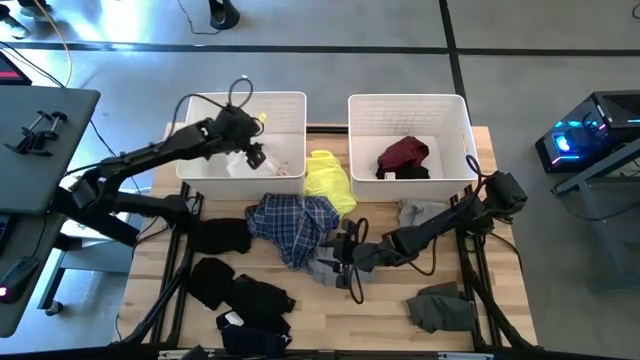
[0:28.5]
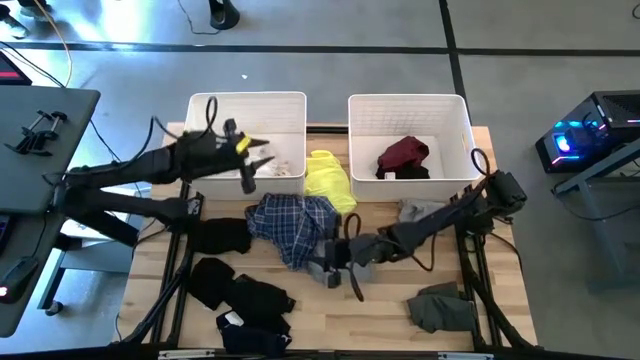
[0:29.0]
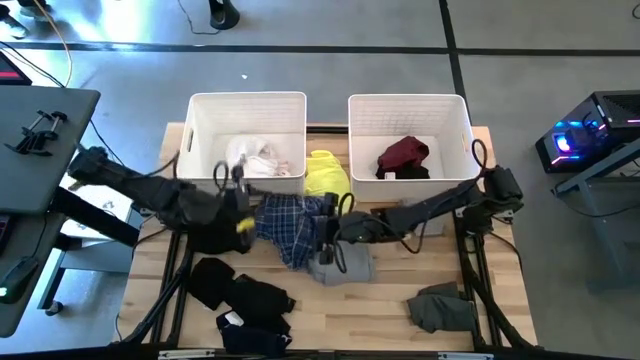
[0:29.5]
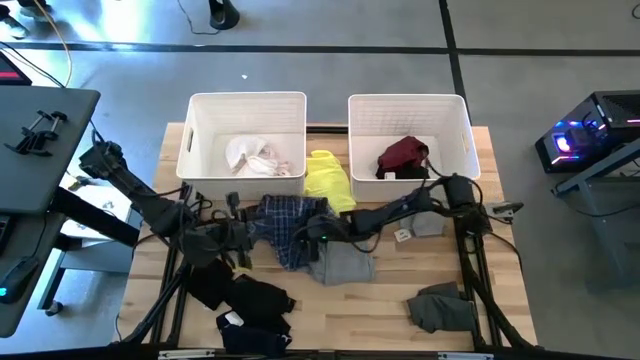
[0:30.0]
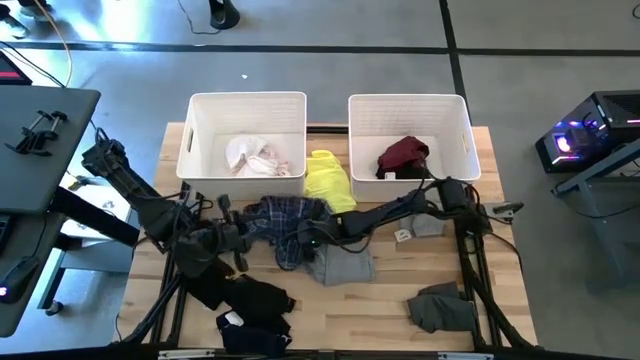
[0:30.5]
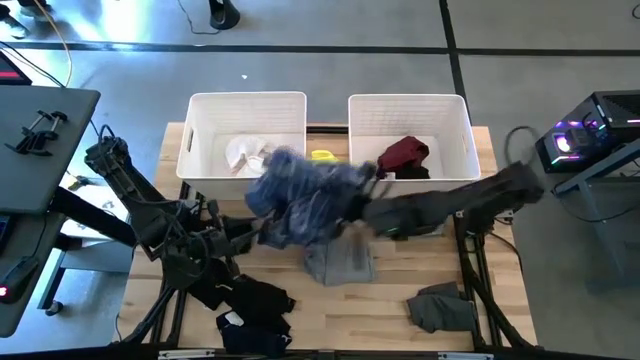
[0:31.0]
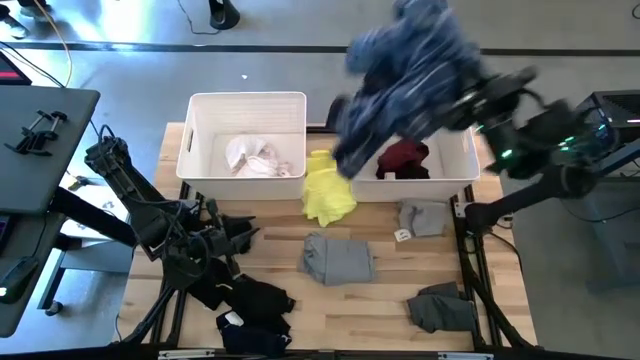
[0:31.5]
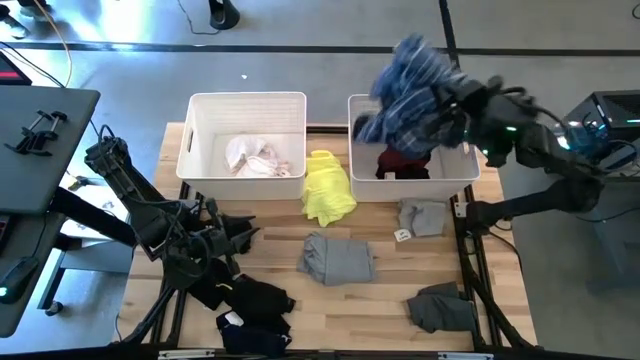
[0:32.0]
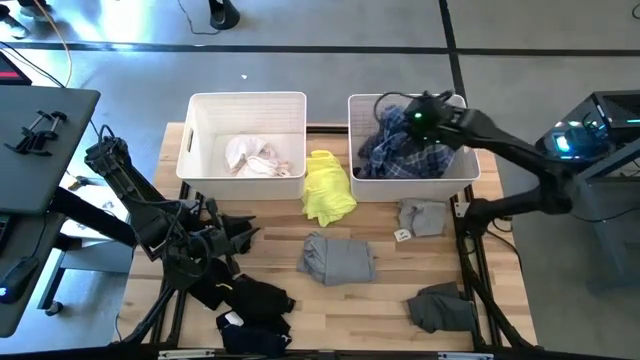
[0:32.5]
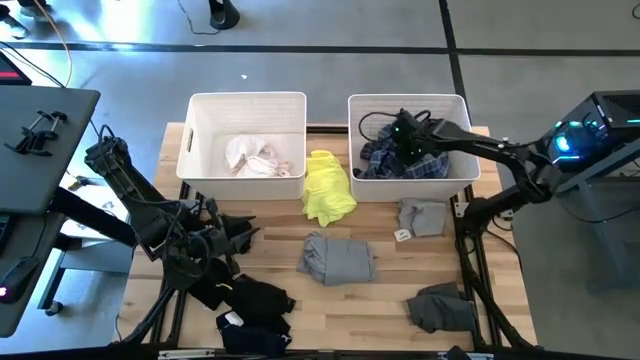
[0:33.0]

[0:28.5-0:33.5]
Task: Sort clothes
Put the blue long-sleeved shirt into the right white laundry bin

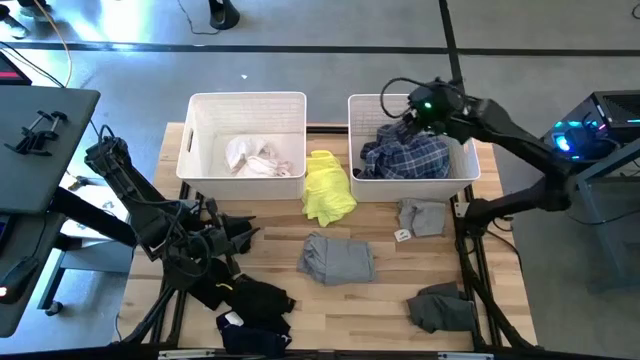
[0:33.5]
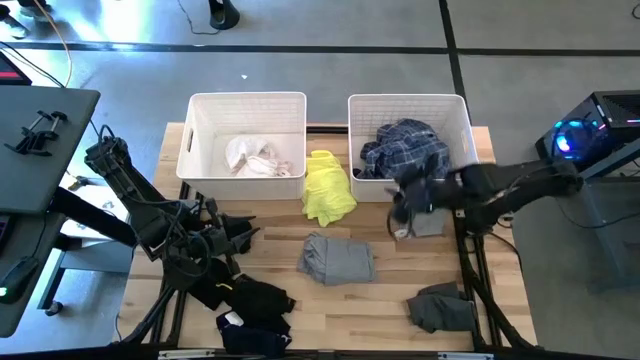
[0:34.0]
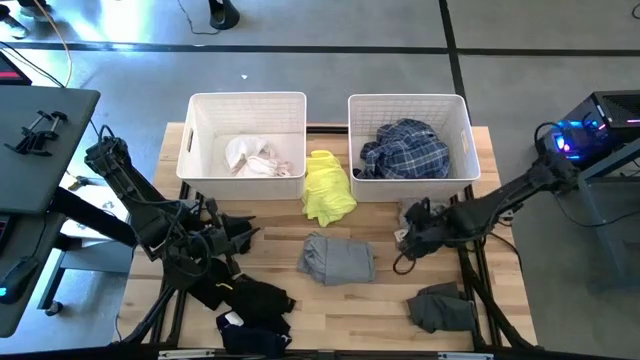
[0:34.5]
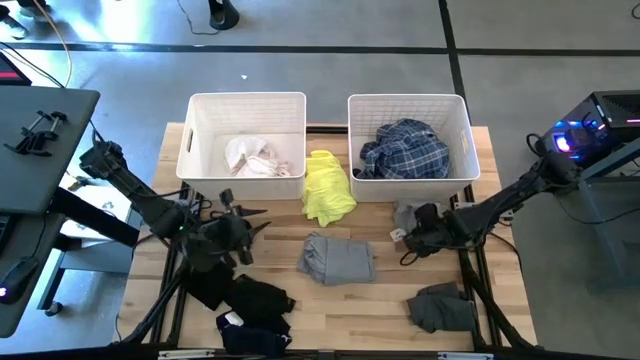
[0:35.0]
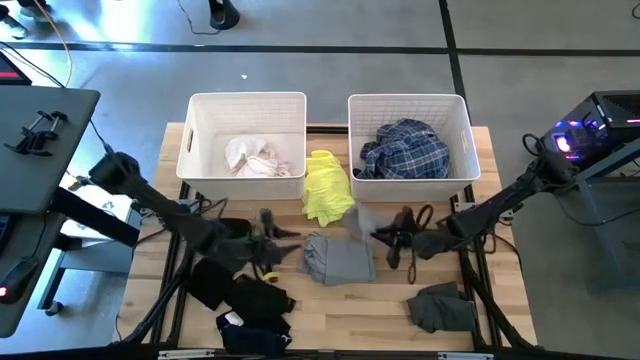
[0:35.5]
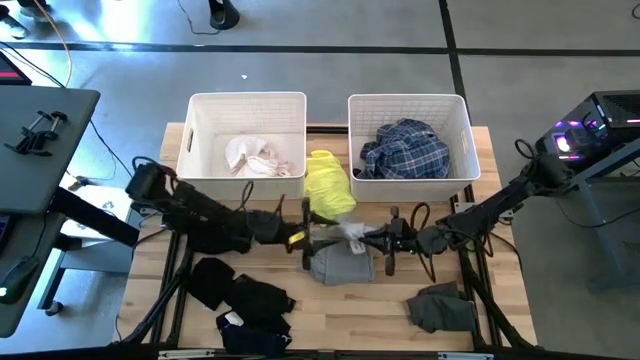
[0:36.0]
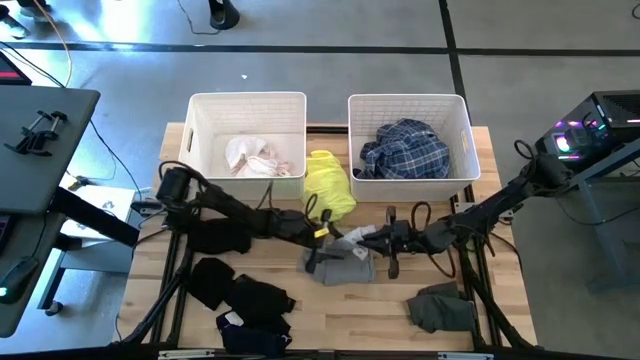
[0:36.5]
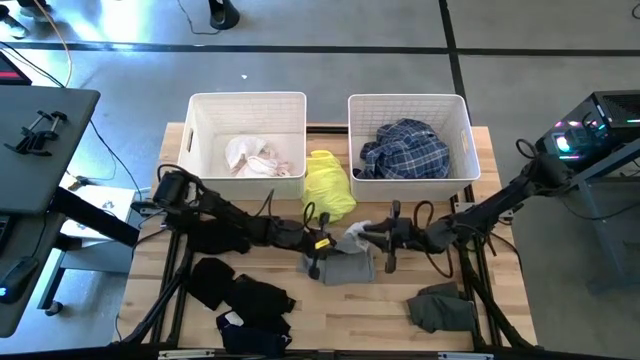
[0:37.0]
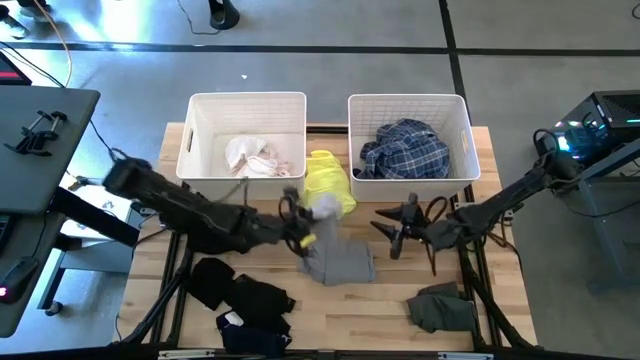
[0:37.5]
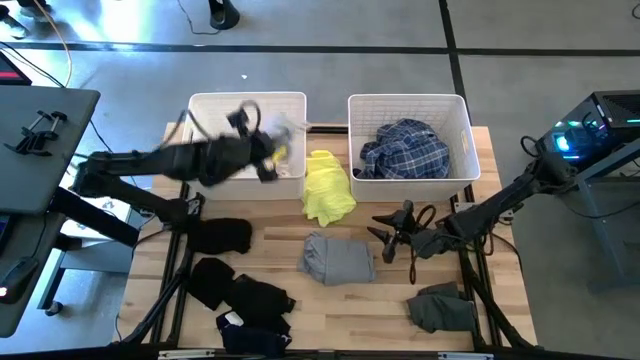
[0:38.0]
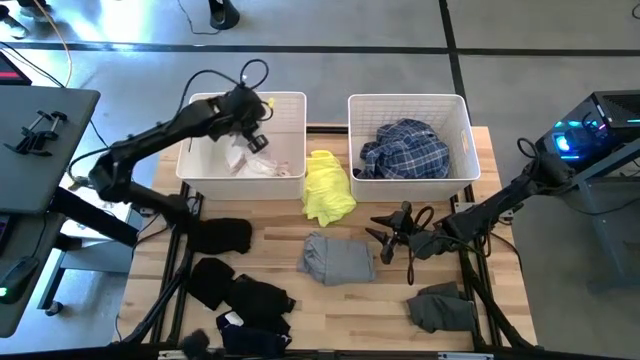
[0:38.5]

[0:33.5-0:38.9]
Put the gray boxers into the left white laundry bin

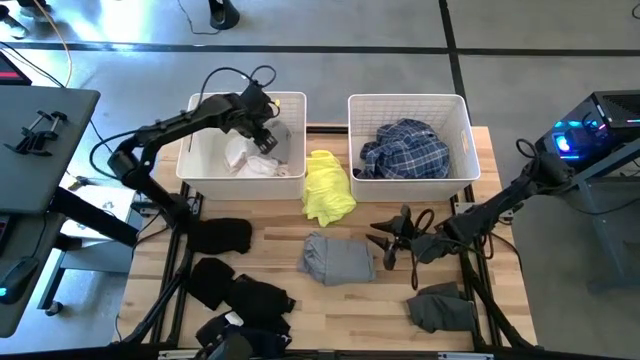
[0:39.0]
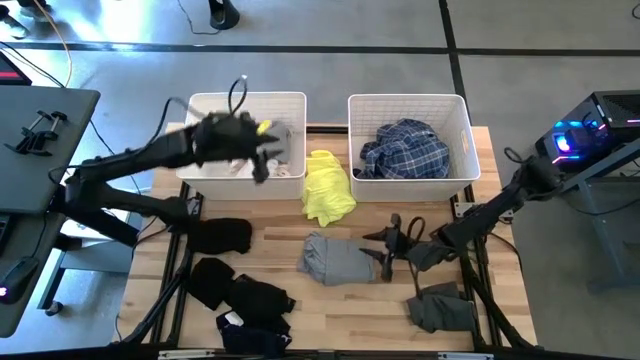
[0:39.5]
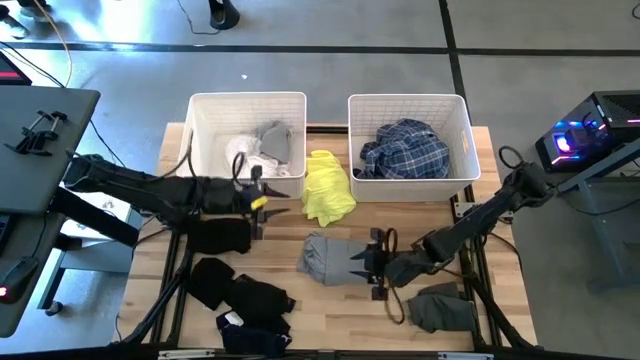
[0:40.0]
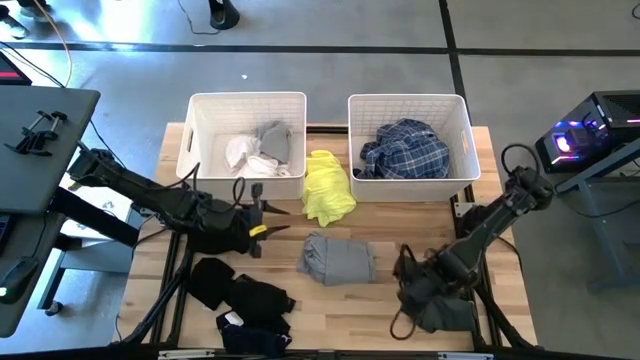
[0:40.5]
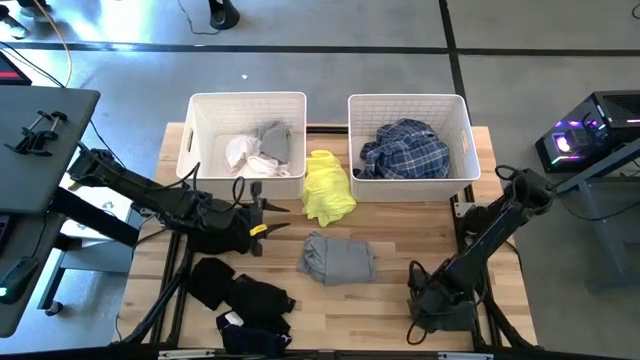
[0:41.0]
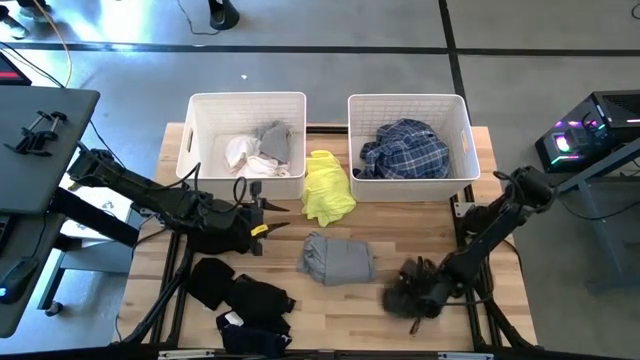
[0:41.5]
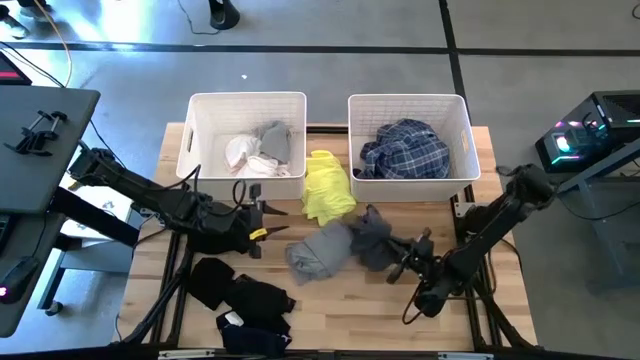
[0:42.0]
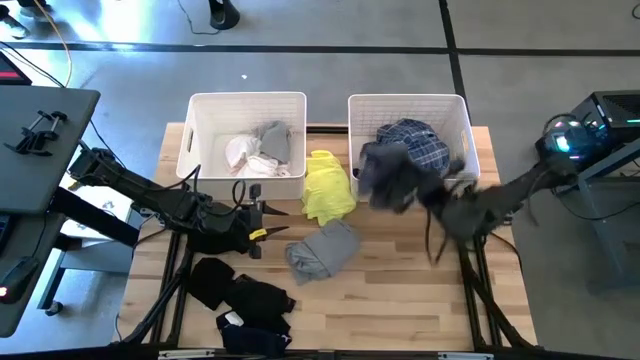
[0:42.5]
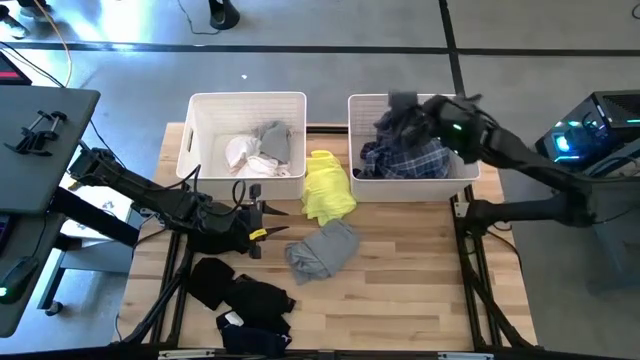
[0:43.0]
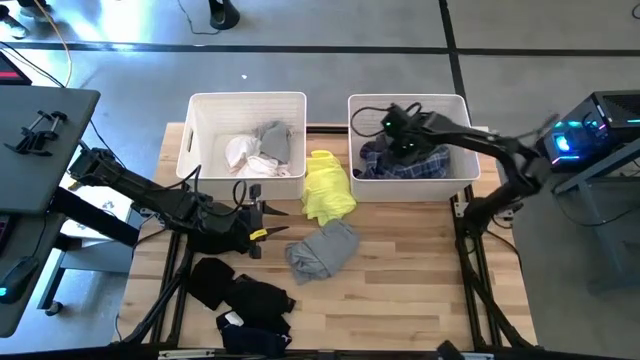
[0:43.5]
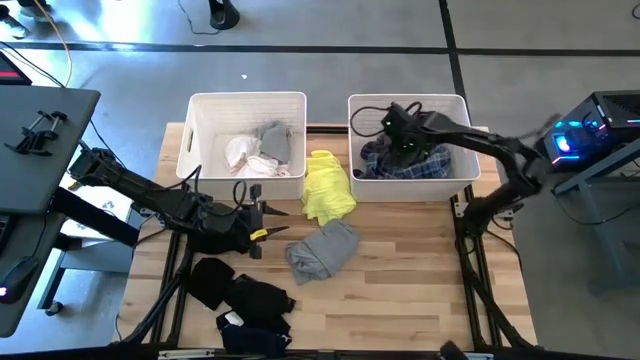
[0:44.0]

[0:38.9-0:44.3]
Put the dark gray boxer into the right white laundry bin

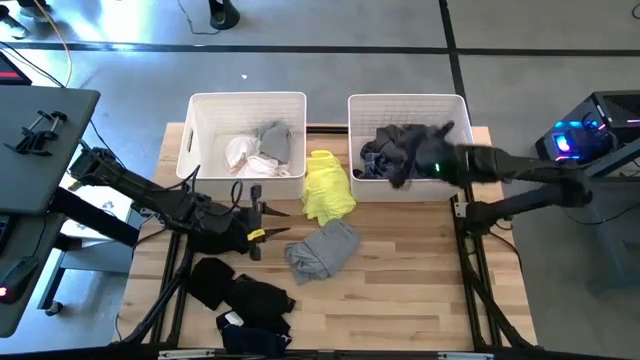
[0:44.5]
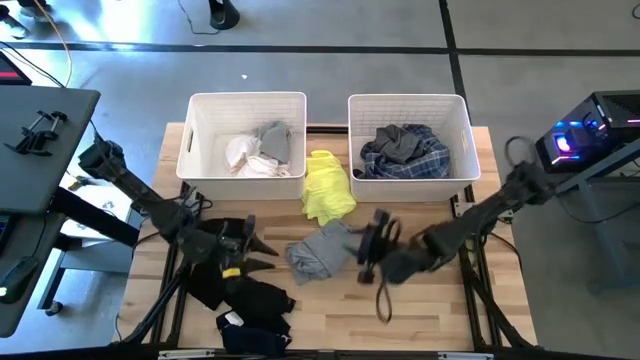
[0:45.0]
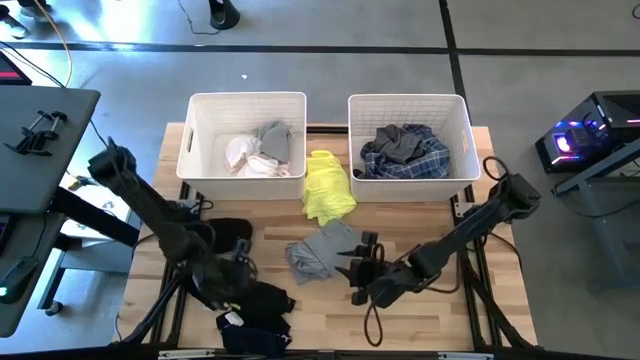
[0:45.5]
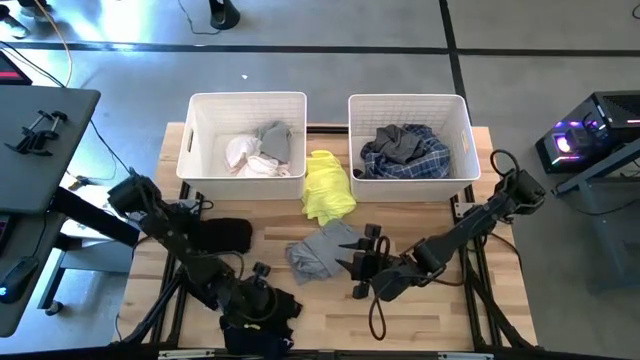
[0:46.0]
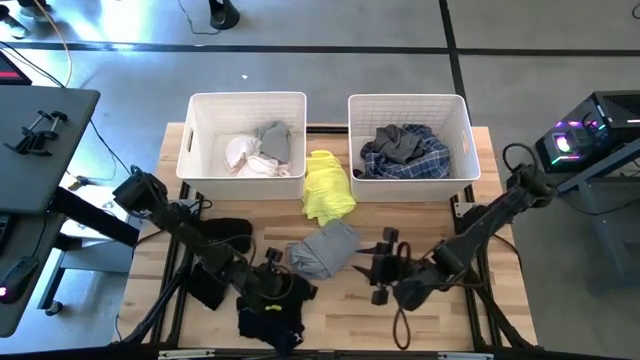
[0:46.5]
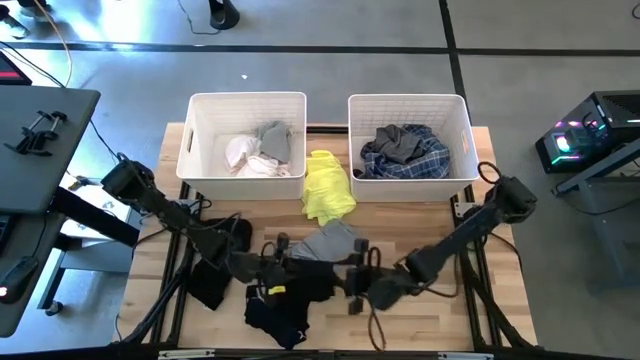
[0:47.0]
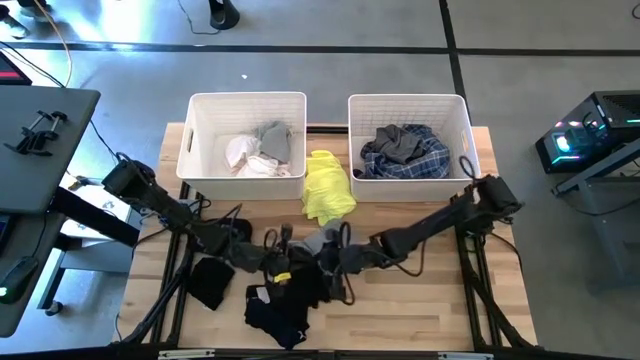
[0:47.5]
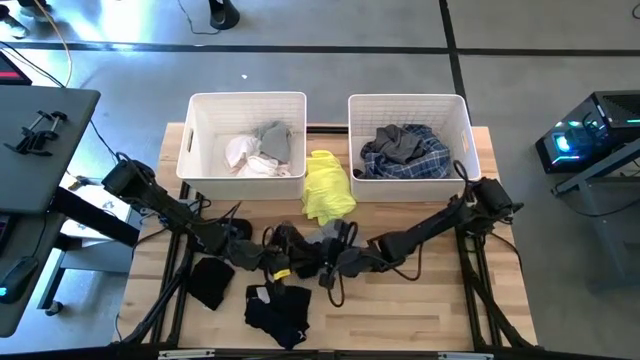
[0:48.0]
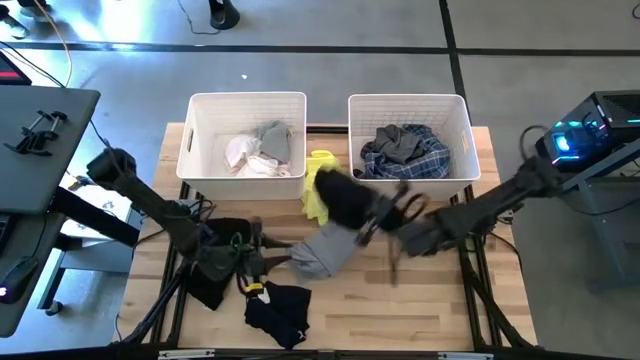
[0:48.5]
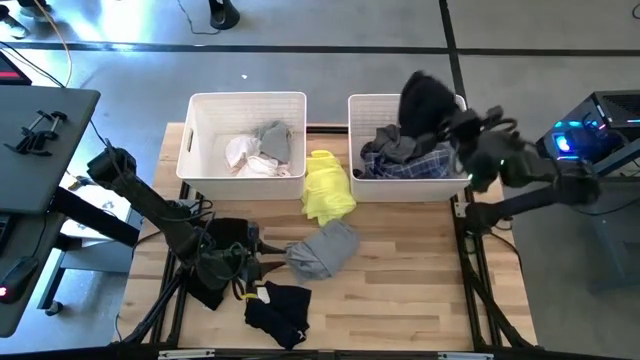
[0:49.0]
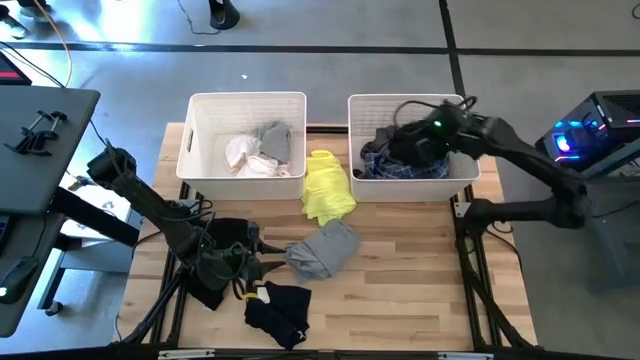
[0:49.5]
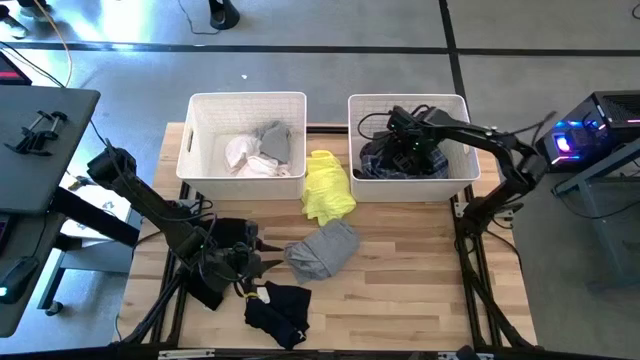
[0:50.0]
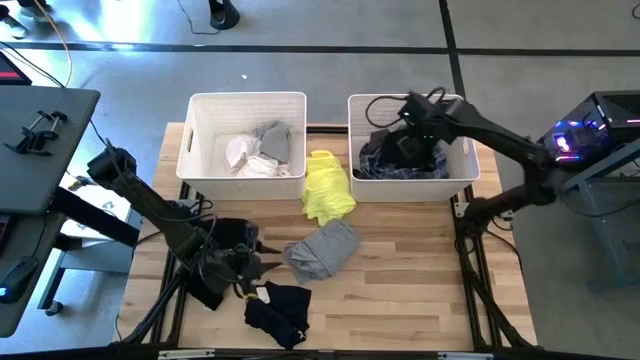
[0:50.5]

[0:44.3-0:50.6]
Put the black shirt into the right white laundry bin
